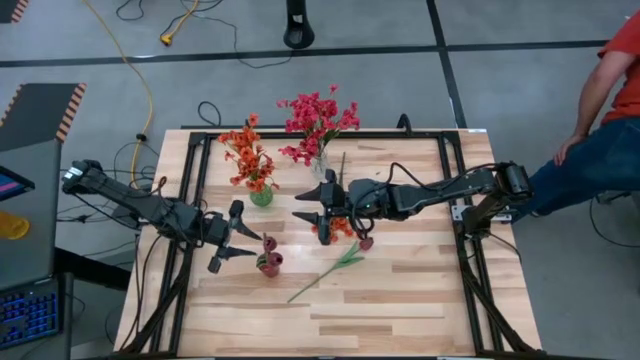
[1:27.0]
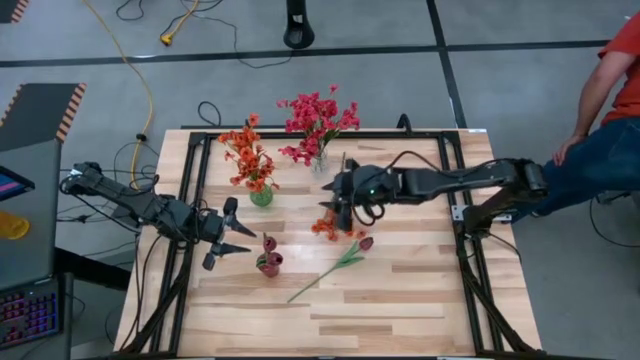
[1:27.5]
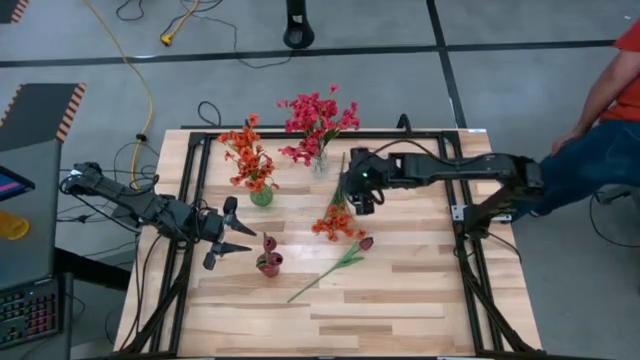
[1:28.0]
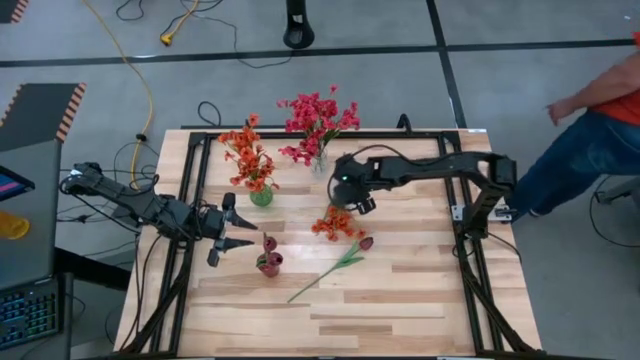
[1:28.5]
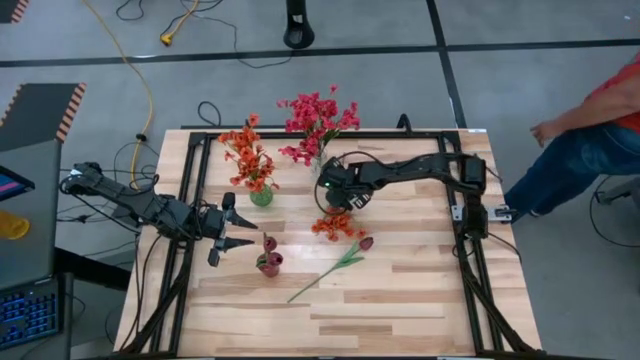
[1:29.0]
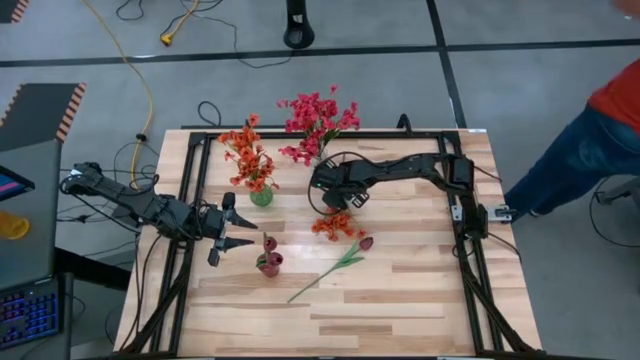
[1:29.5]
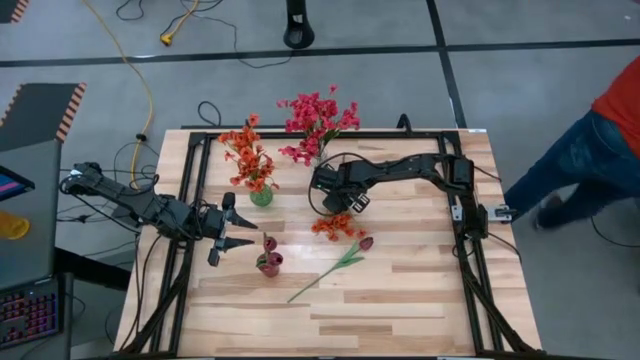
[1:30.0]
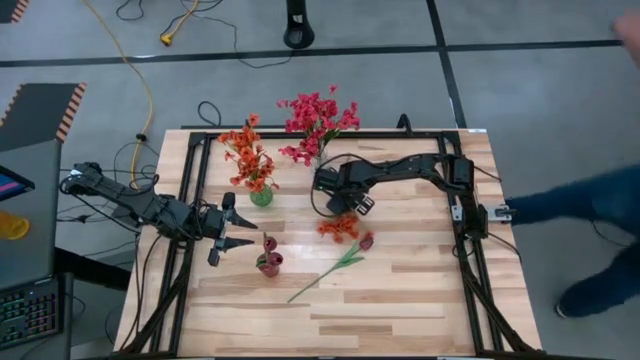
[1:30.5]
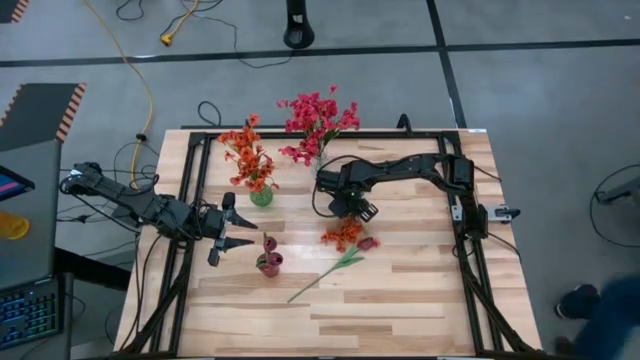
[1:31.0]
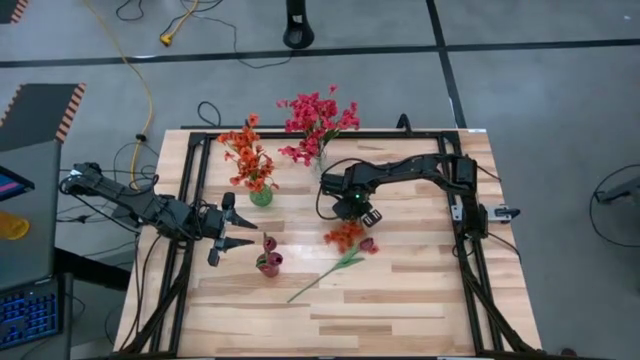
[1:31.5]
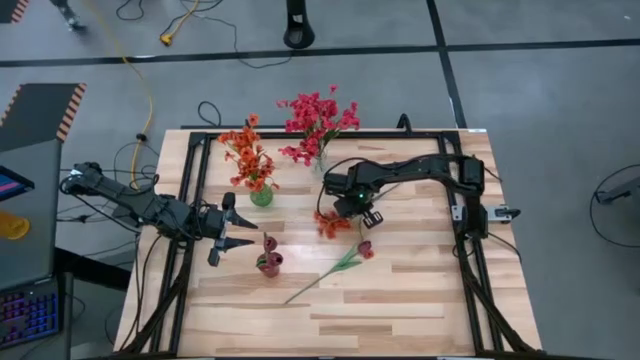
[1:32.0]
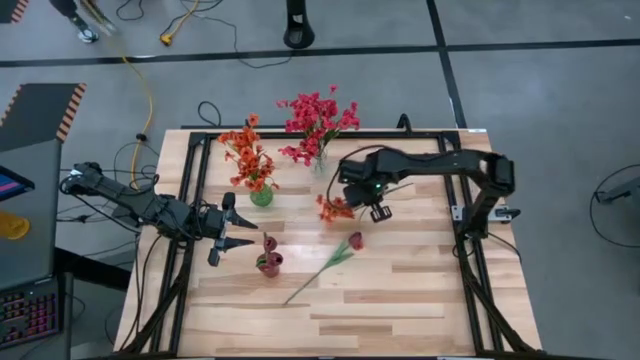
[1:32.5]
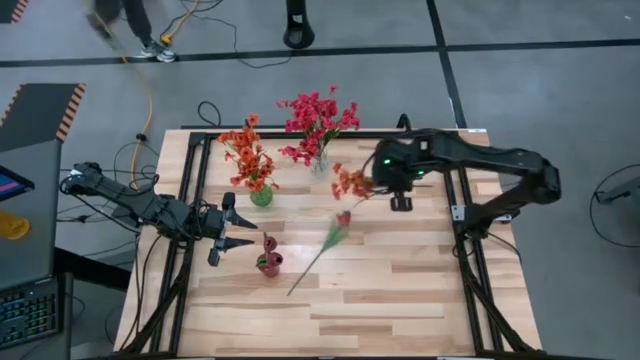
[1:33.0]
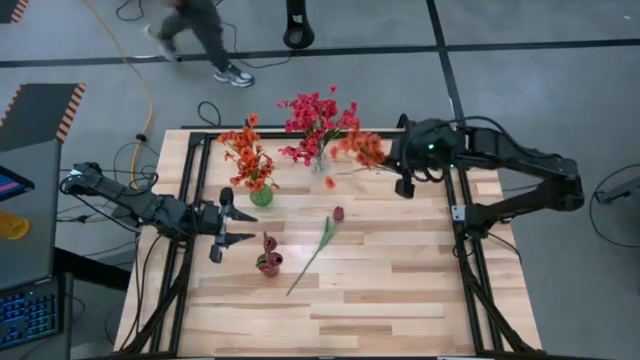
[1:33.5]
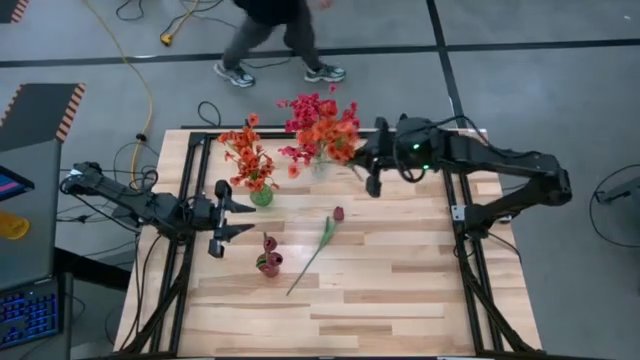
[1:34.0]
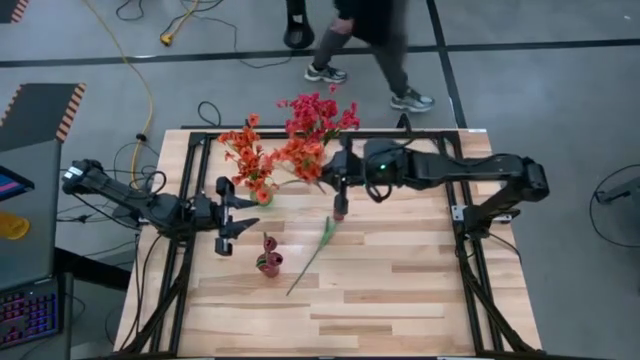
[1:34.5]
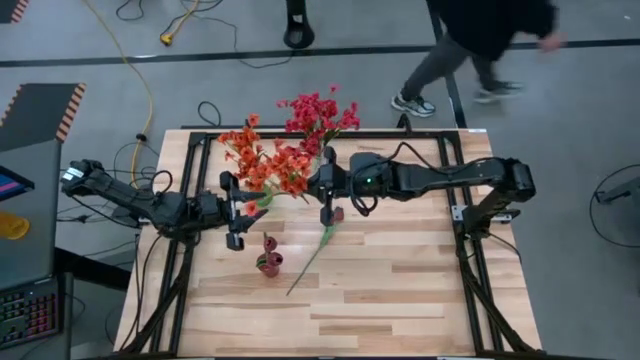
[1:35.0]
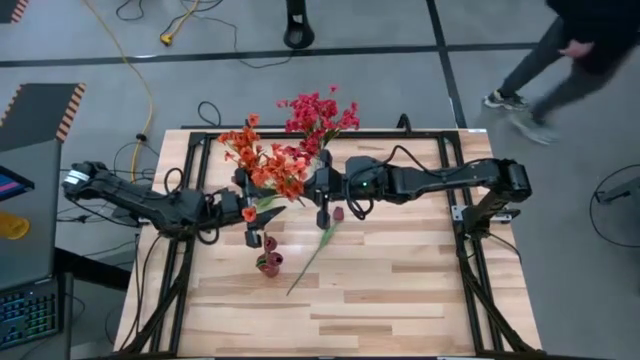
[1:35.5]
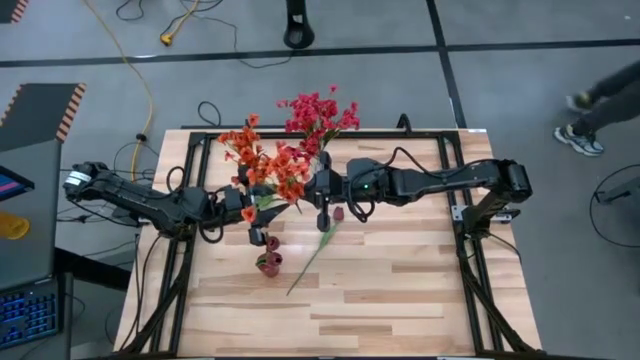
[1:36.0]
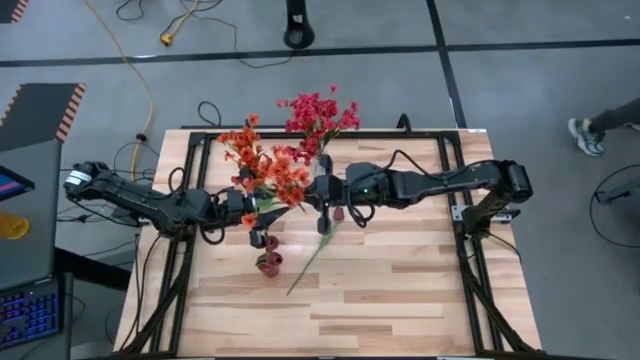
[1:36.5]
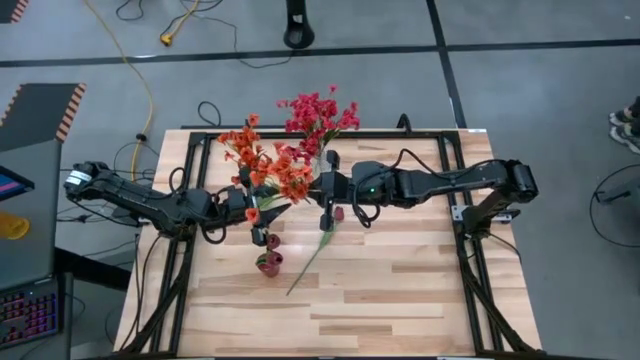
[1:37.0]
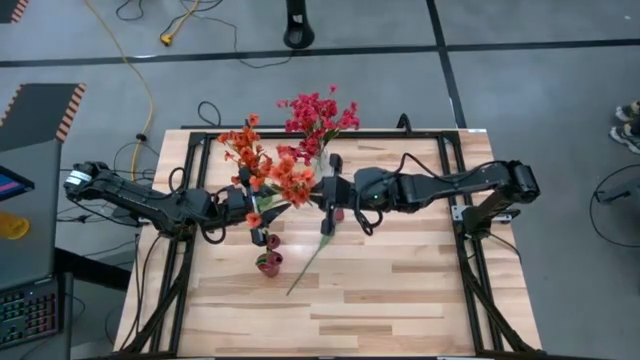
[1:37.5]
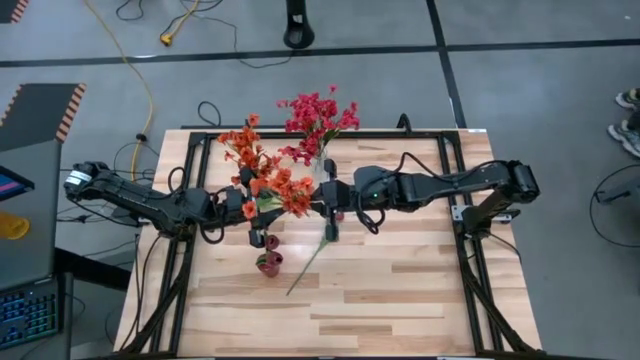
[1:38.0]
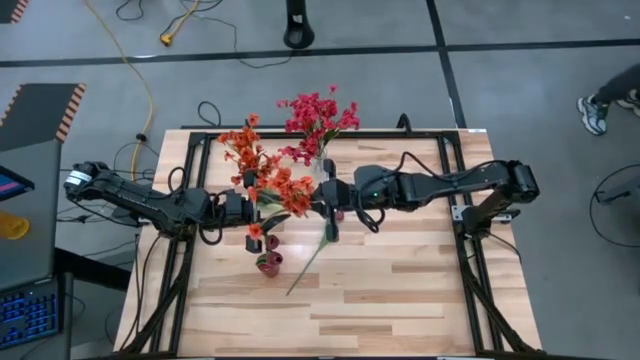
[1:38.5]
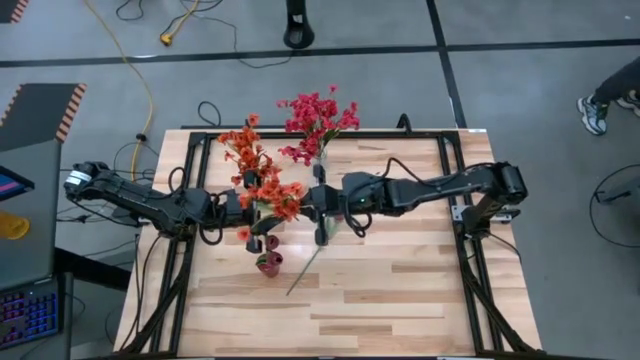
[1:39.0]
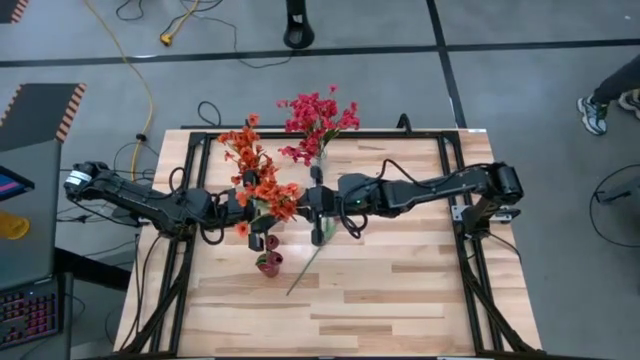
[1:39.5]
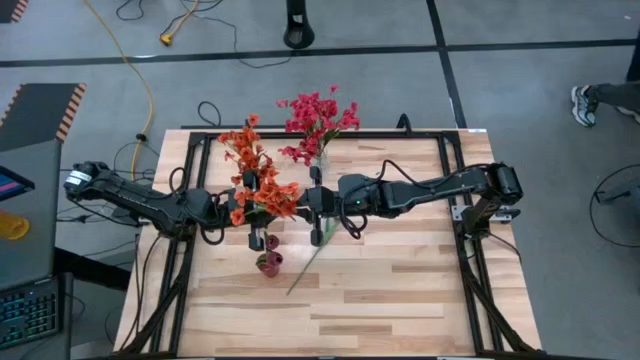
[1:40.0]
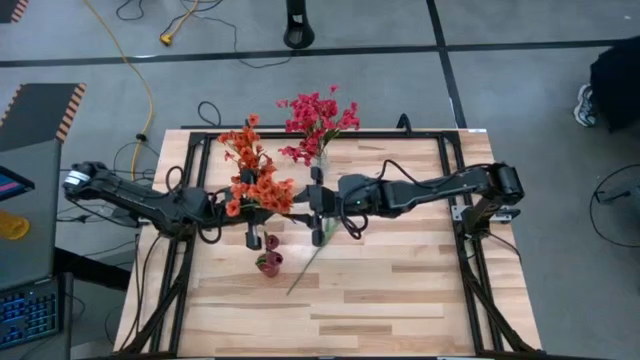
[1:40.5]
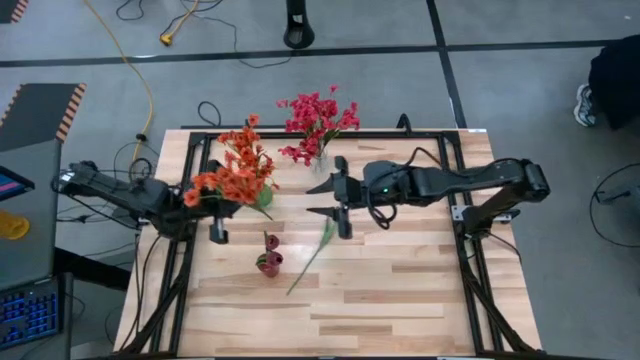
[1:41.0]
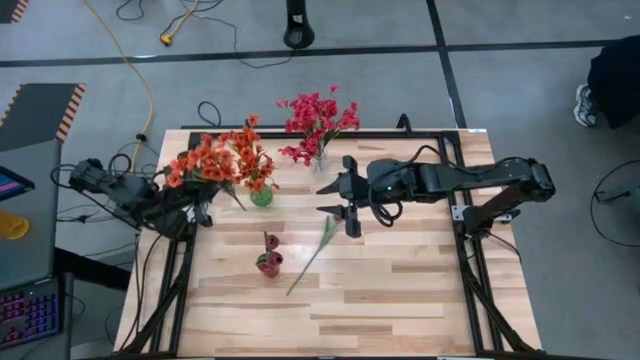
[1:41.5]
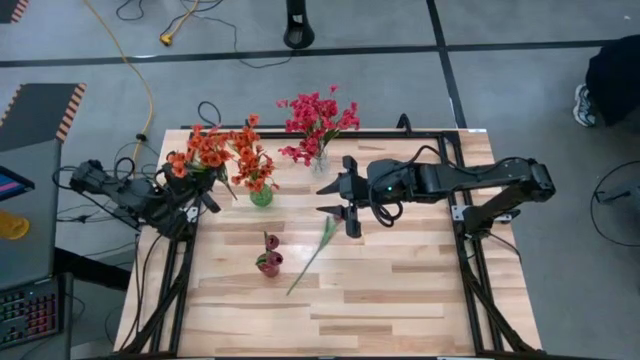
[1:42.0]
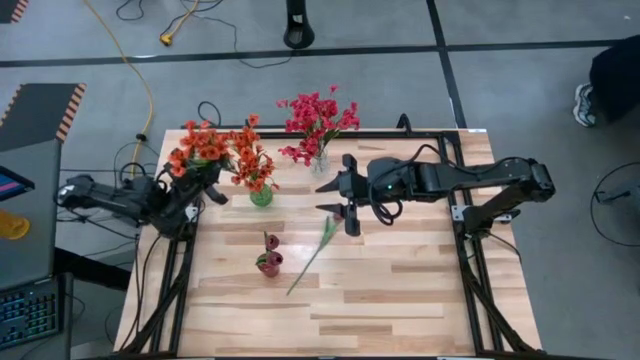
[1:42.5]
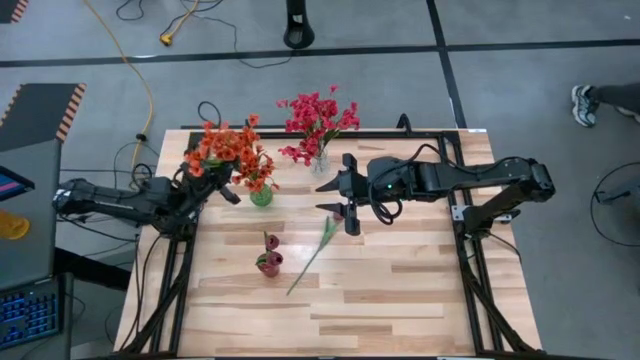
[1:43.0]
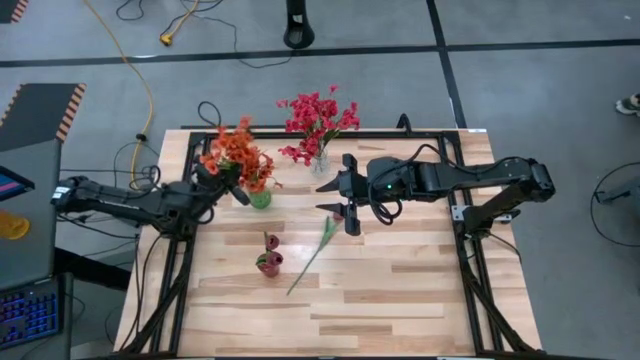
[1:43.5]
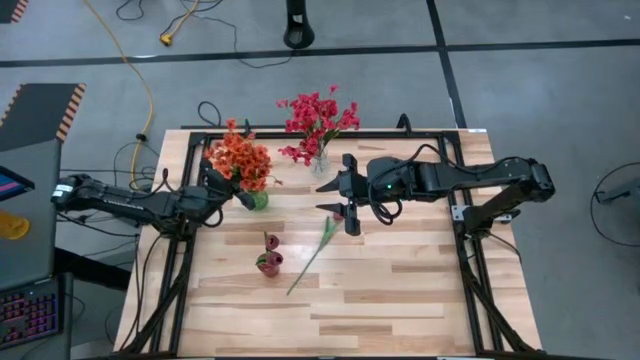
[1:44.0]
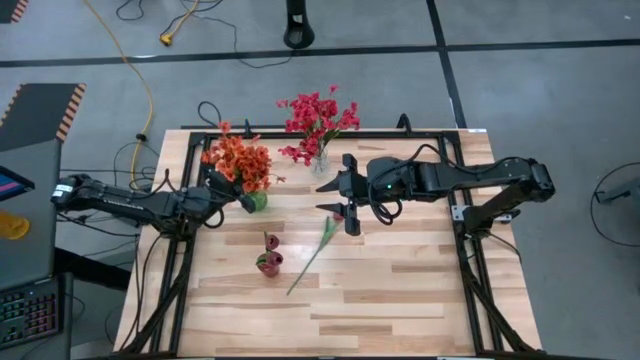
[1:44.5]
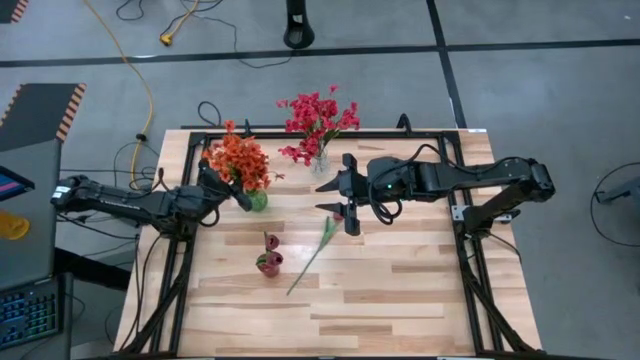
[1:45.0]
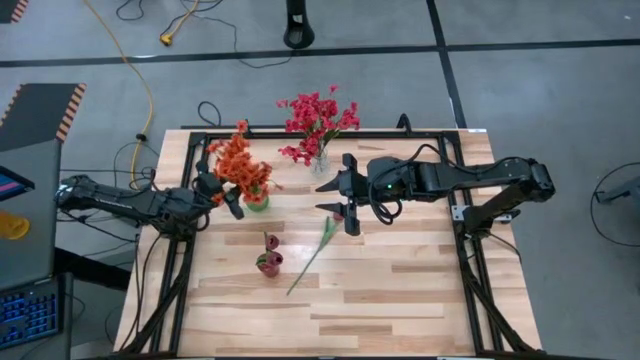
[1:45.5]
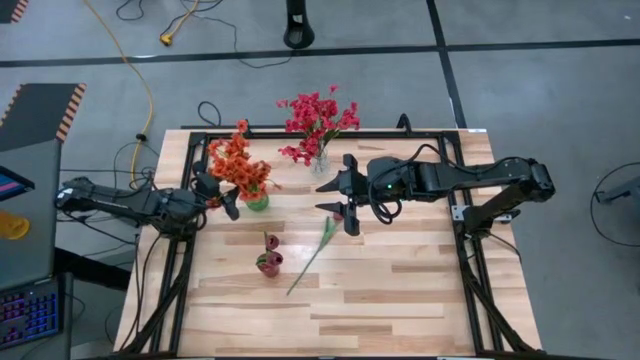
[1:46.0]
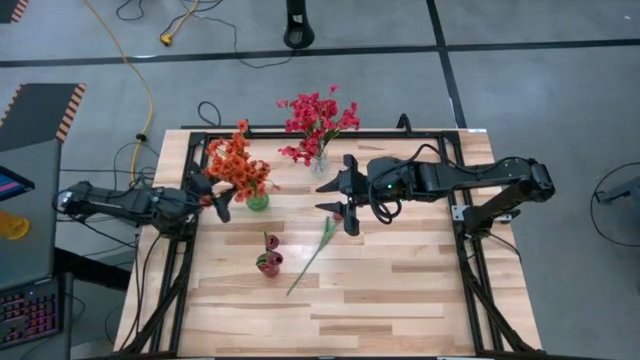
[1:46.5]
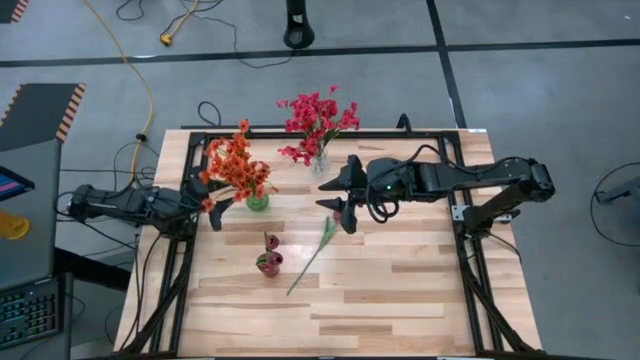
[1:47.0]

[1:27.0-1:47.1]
Task: Sort flowers into vase by color
Put the orange flower into the green vase

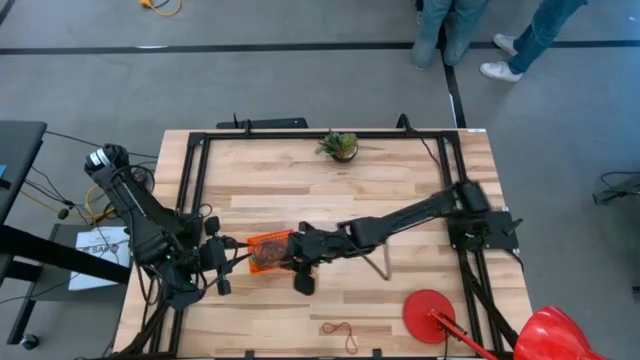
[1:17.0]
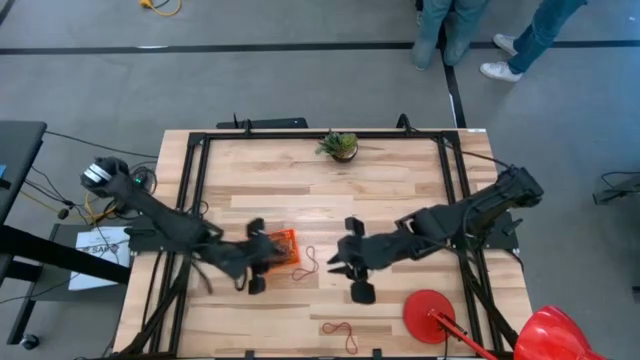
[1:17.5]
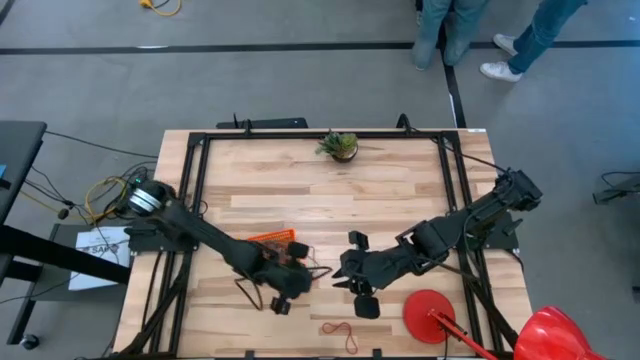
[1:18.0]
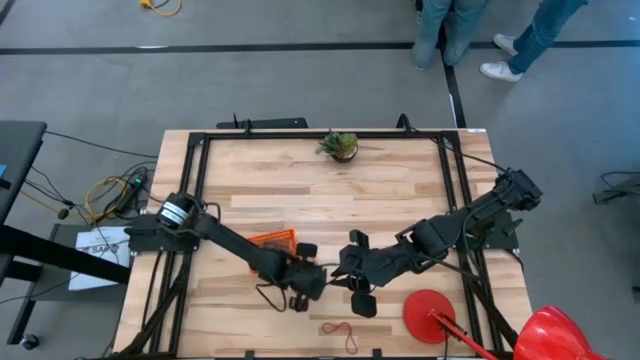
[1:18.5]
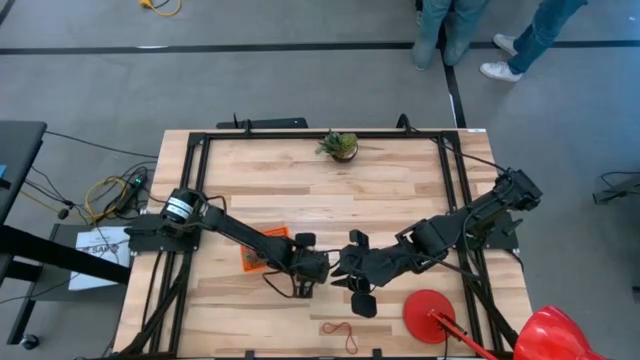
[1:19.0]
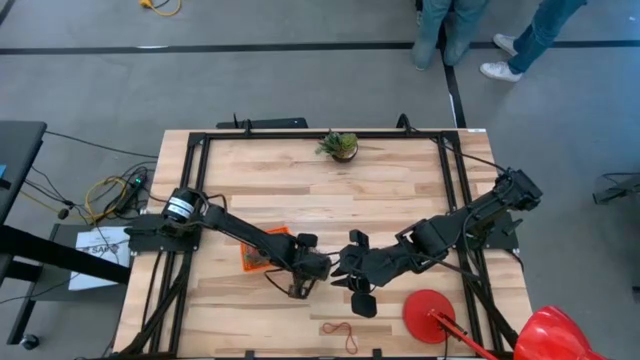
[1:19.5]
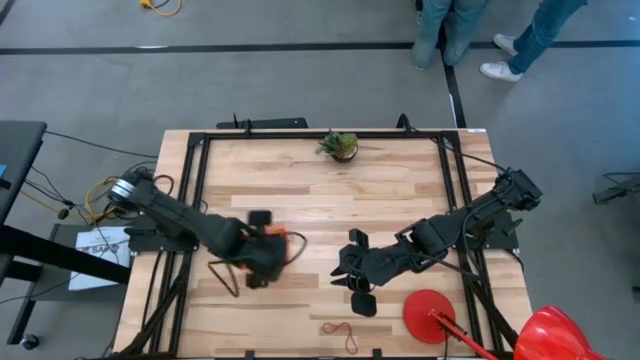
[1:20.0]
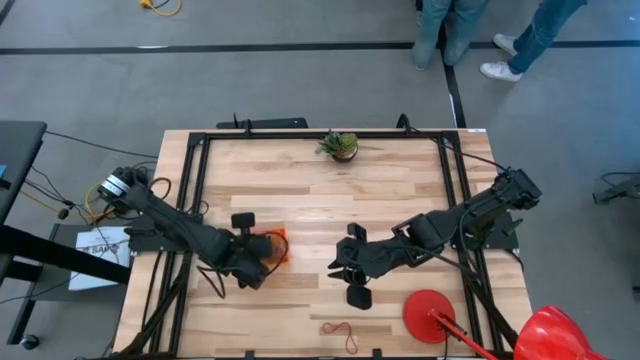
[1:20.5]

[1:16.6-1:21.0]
Task: Pick and place rubber bands into bin
Put the top red rubber band into the orange container
